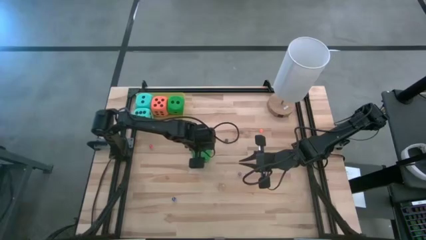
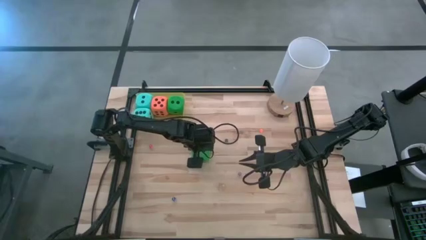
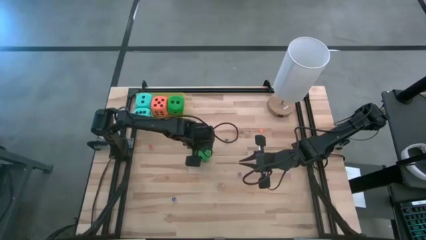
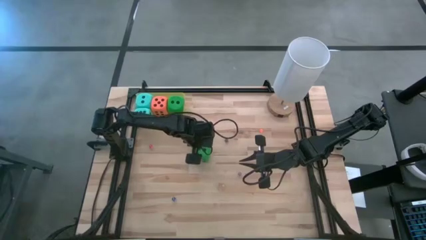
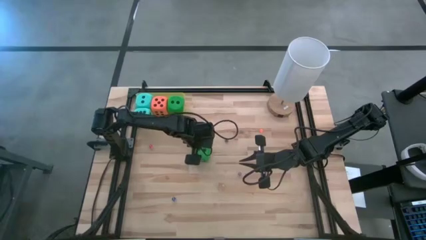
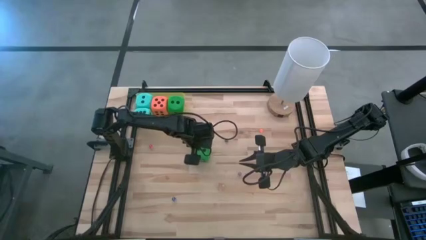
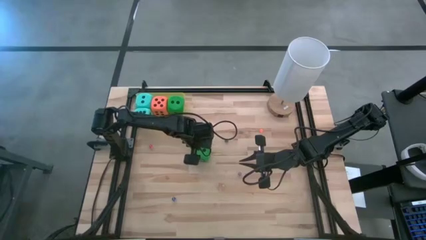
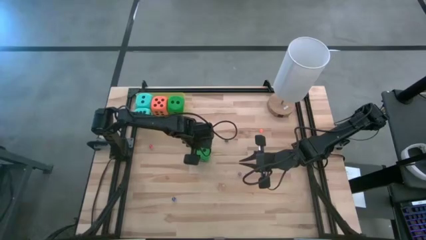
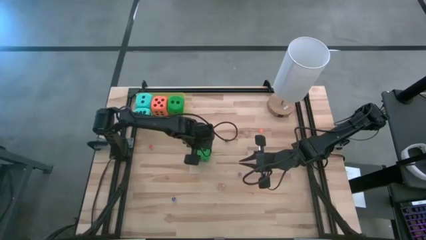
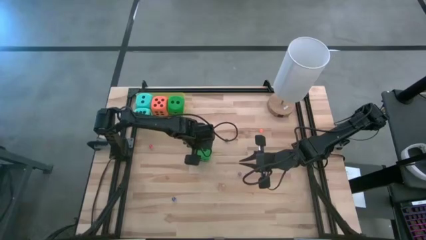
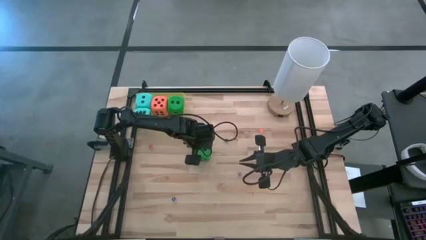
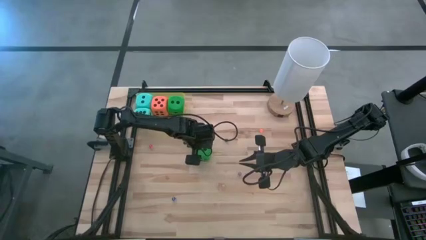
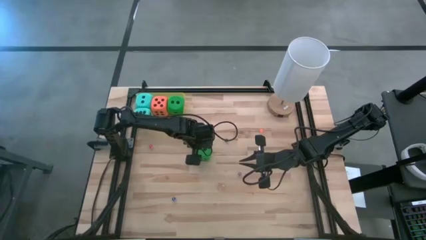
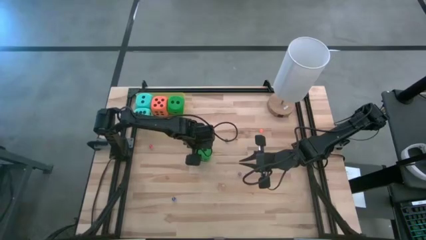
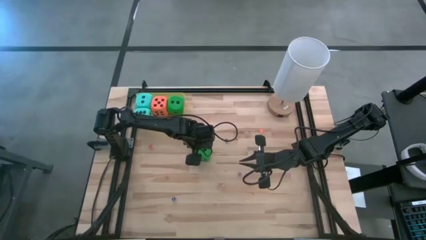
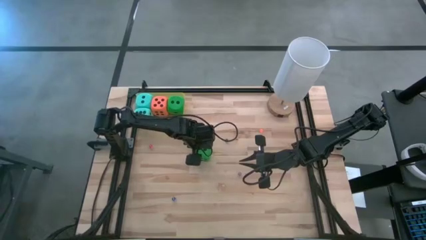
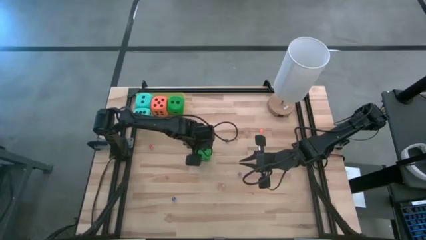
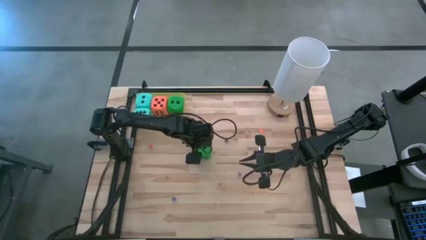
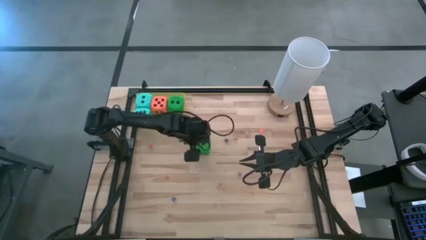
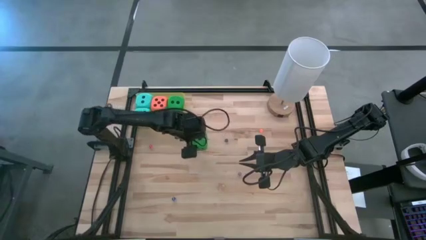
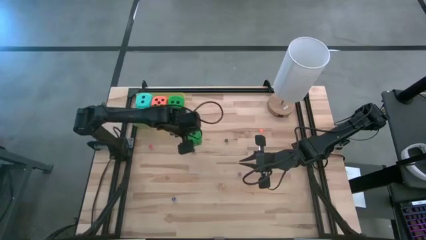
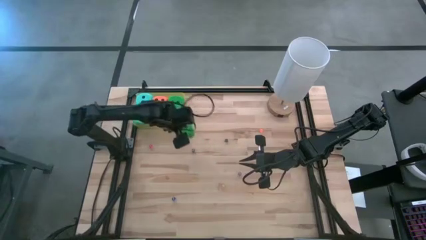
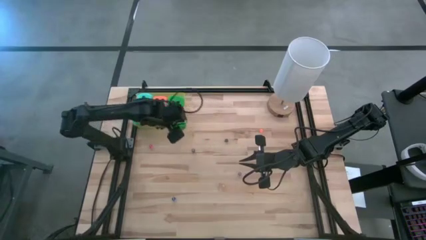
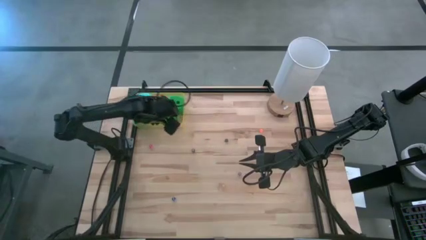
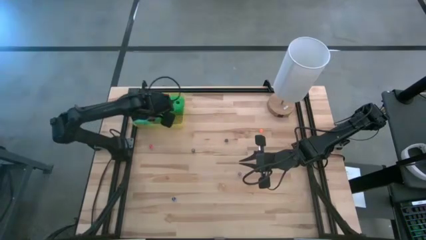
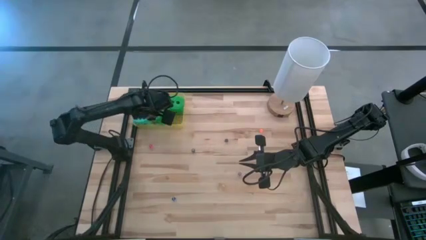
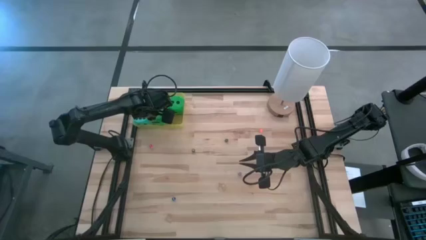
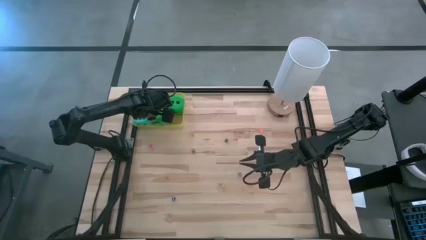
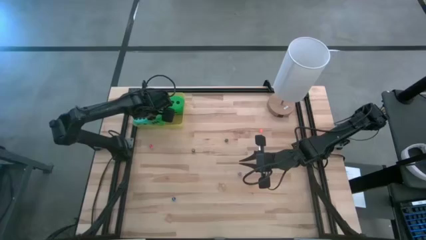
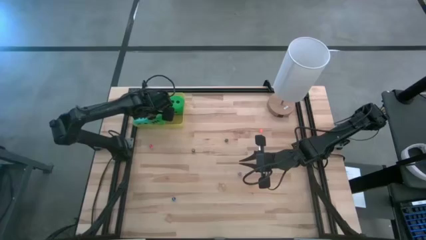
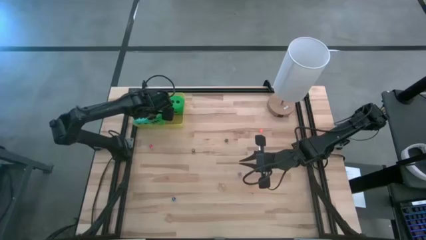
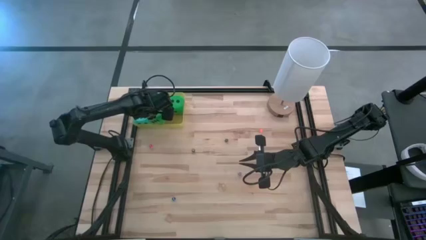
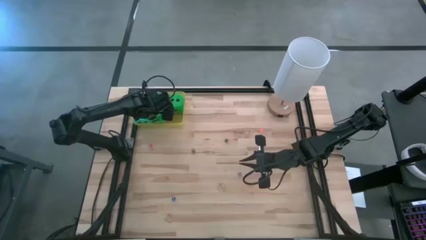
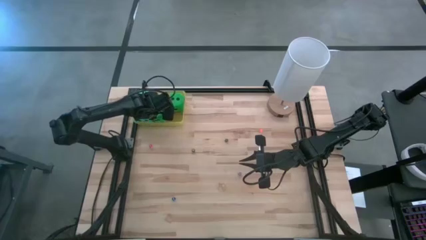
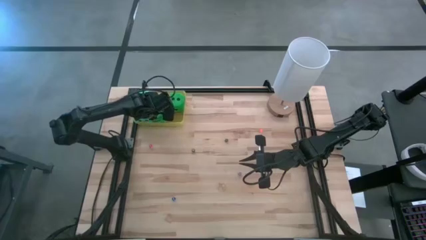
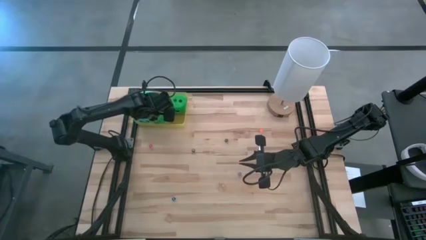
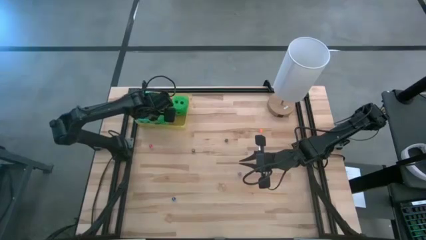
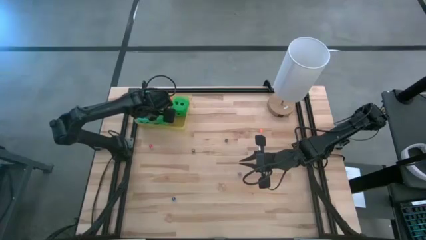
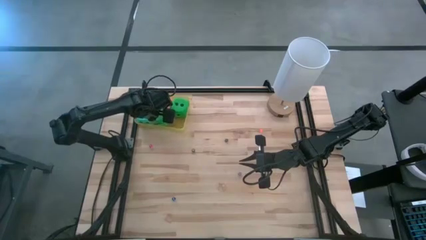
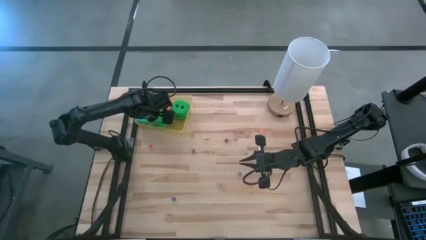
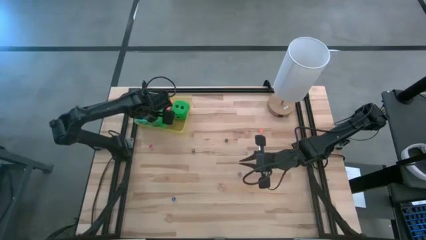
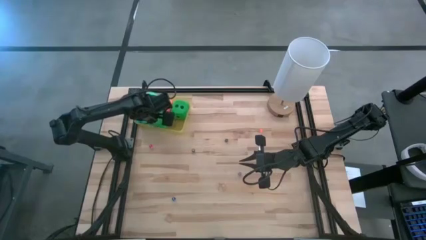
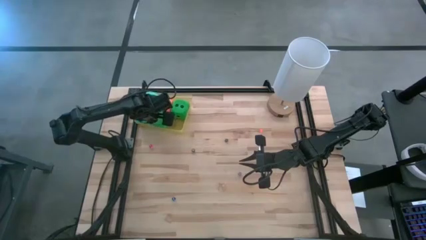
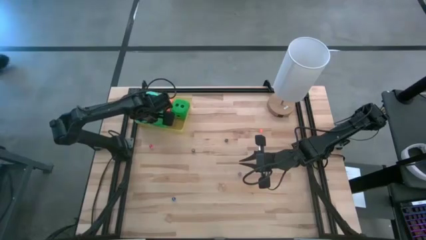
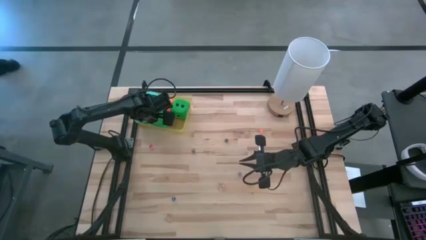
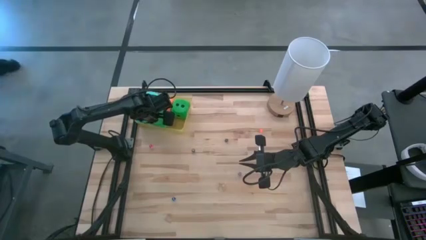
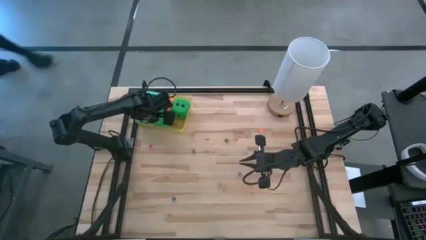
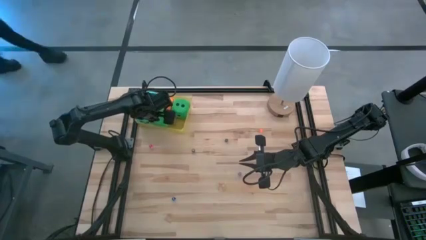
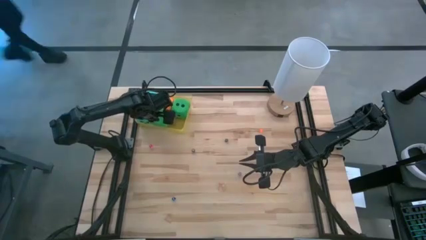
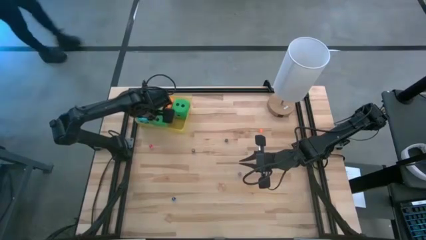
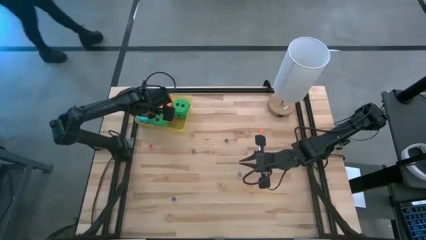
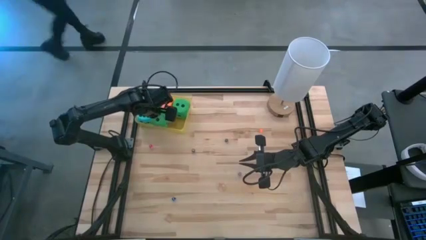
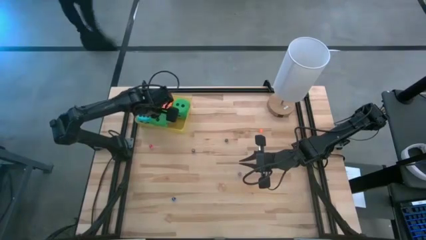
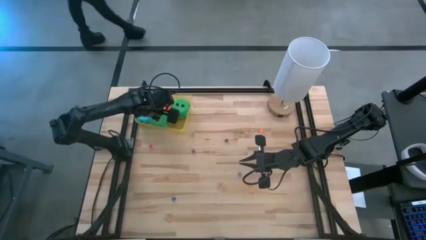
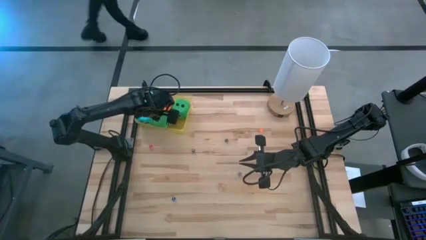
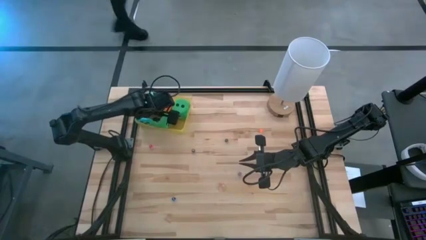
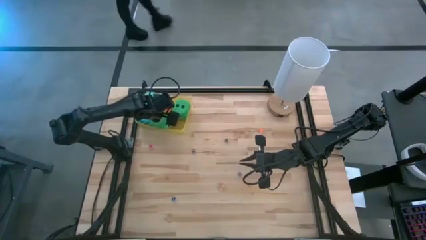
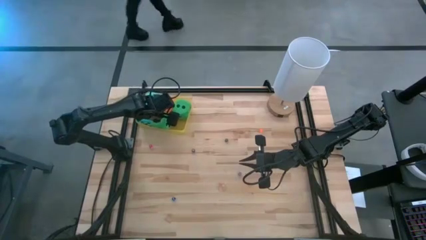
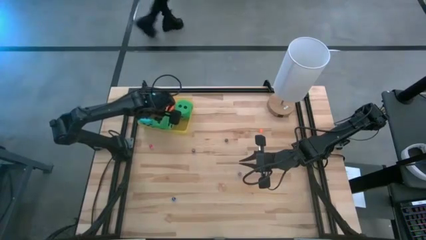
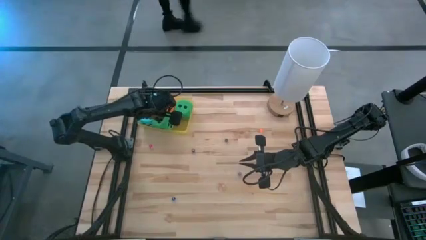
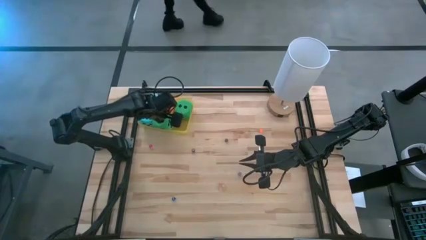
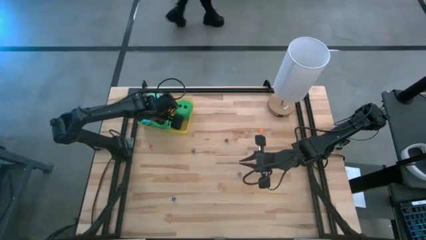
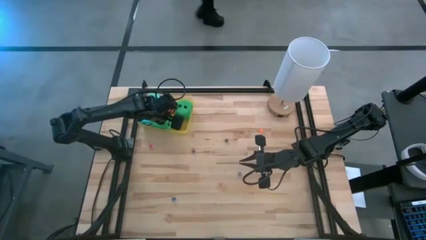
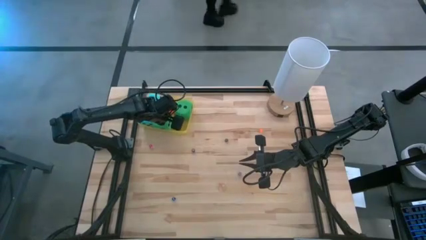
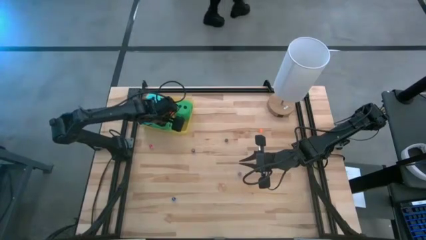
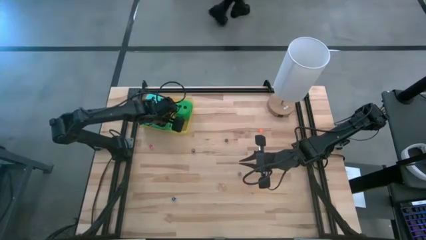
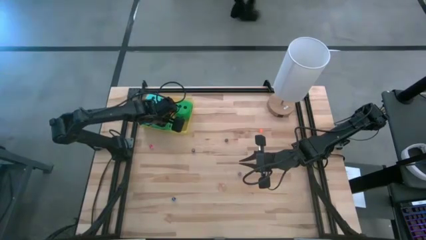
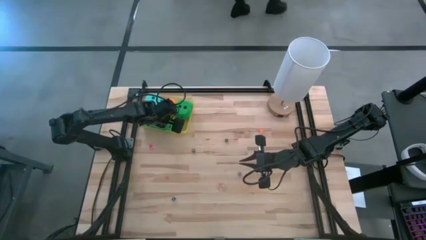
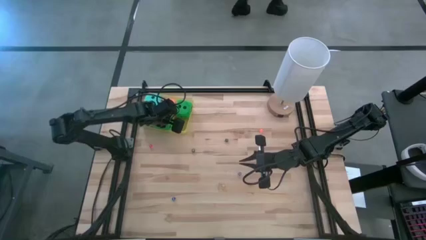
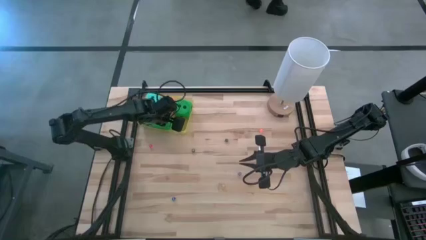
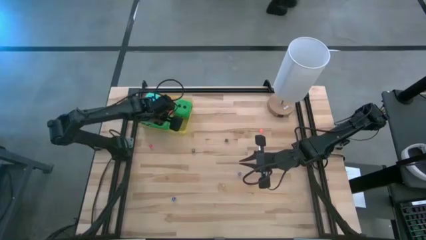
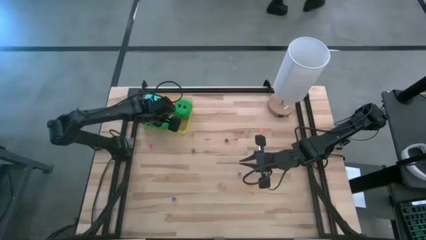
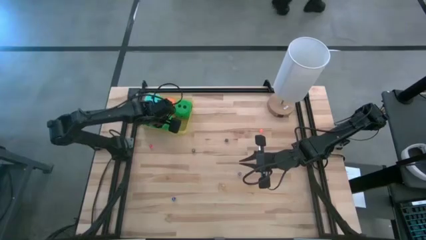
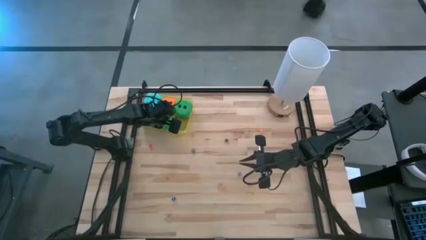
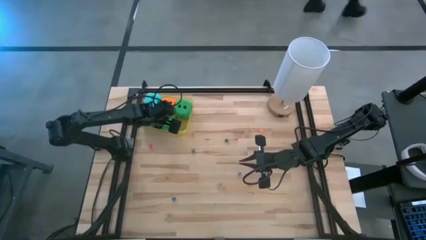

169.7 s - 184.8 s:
Task: Pick & Place Dice
Put the green large die into the yellow container

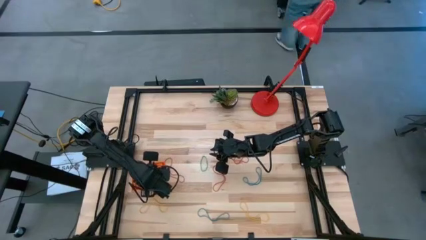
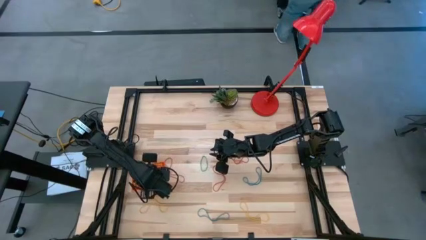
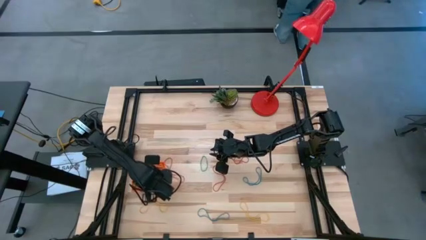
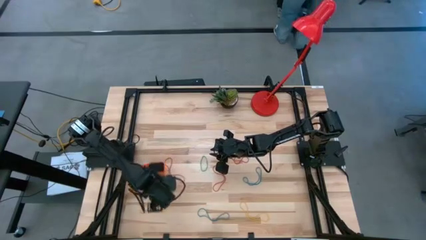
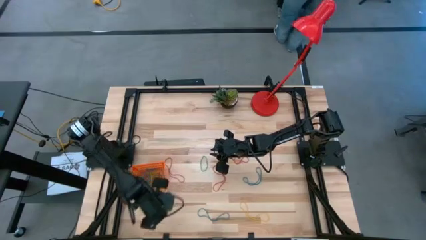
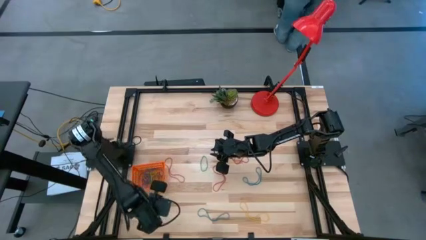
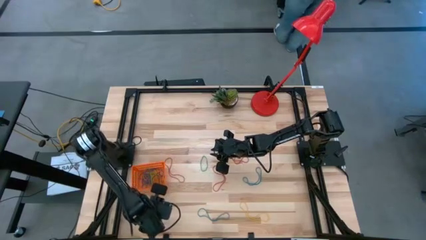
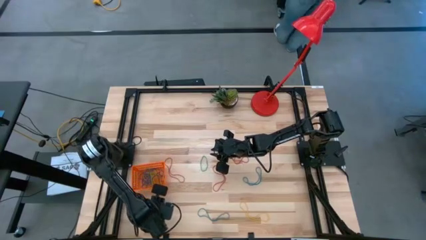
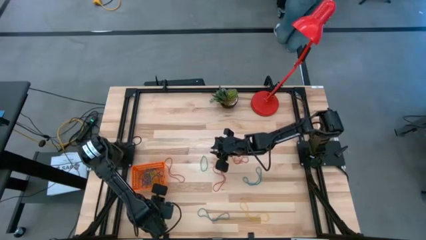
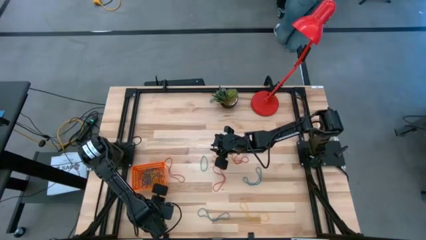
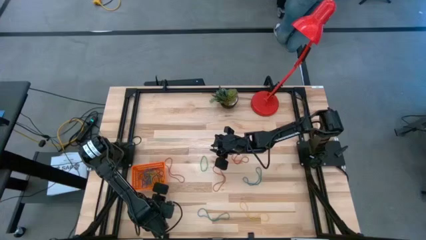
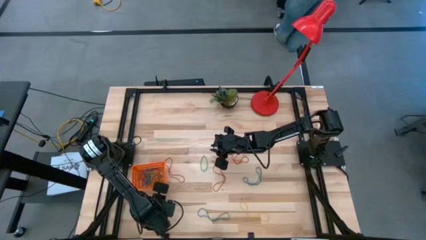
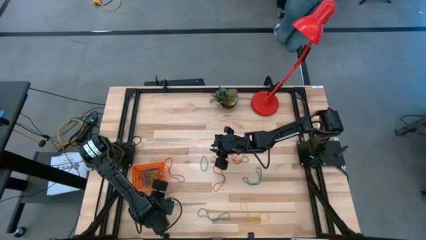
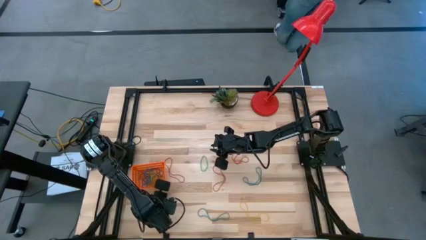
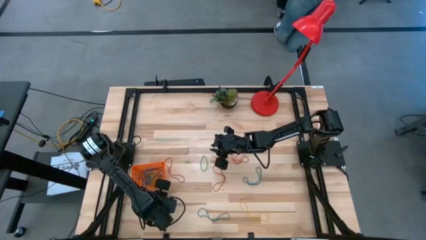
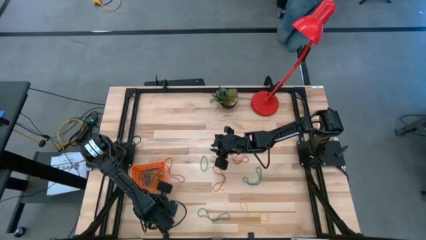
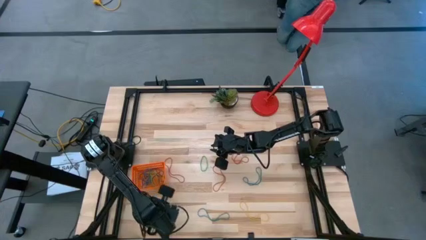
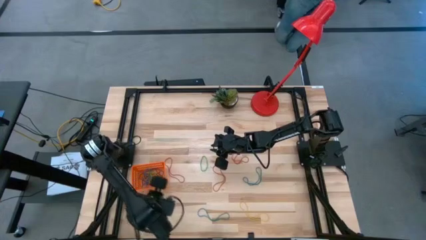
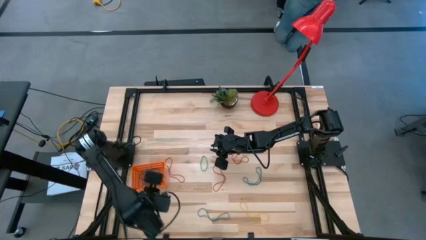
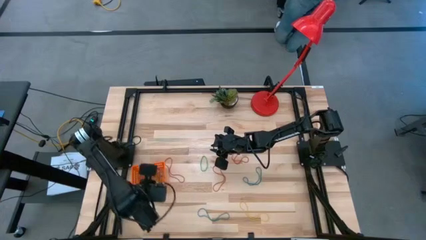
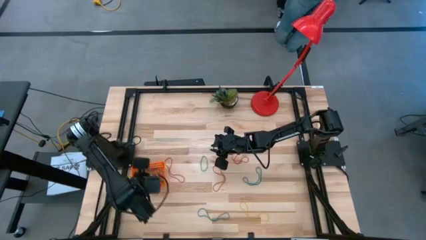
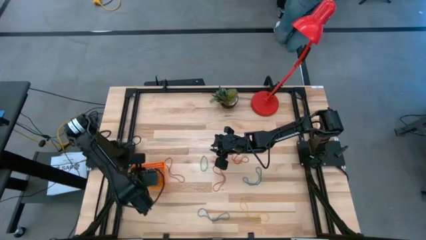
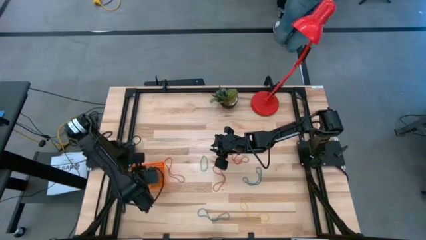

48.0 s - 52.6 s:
Task: Pick and place rubber bands into bin
Put the yellow rubber band into the orange basket
